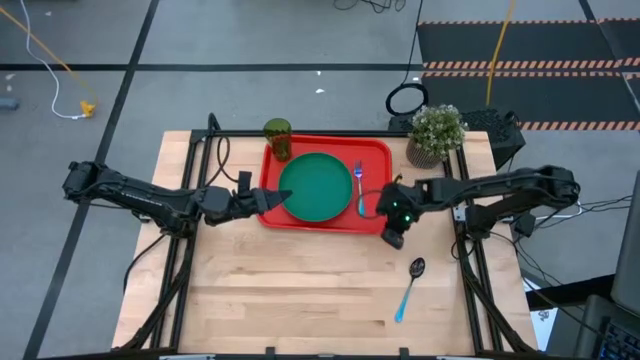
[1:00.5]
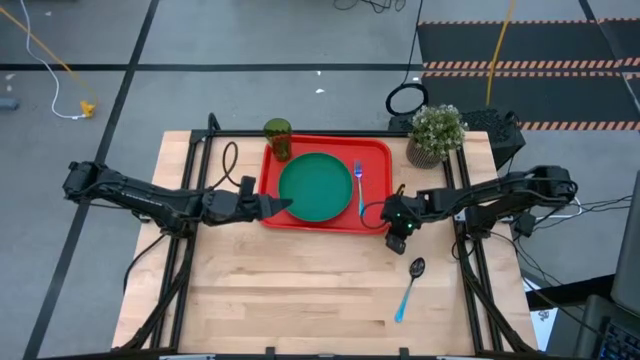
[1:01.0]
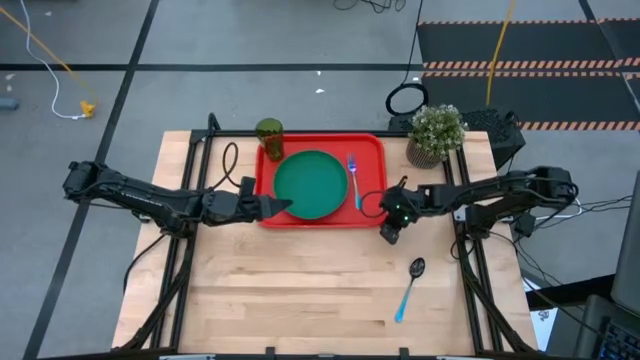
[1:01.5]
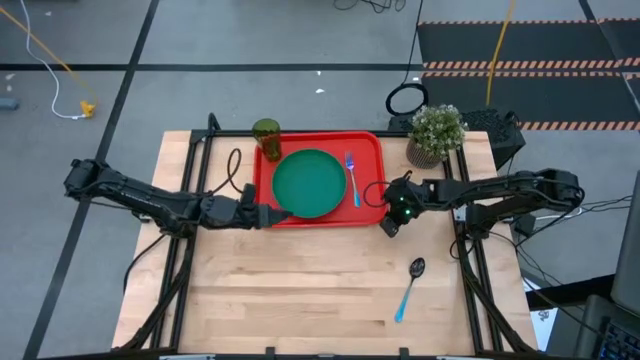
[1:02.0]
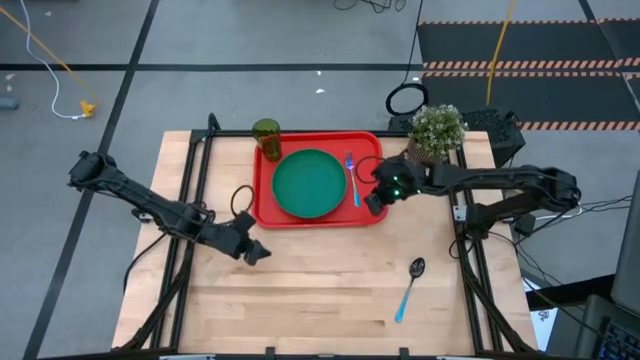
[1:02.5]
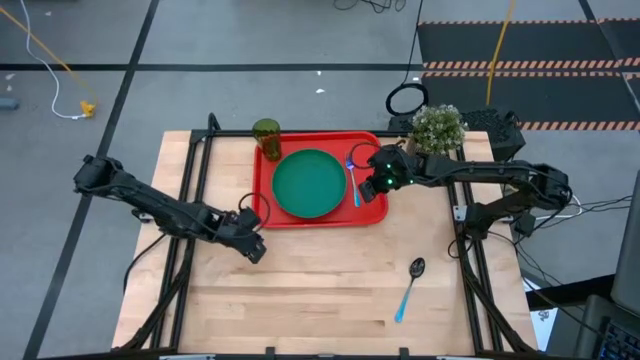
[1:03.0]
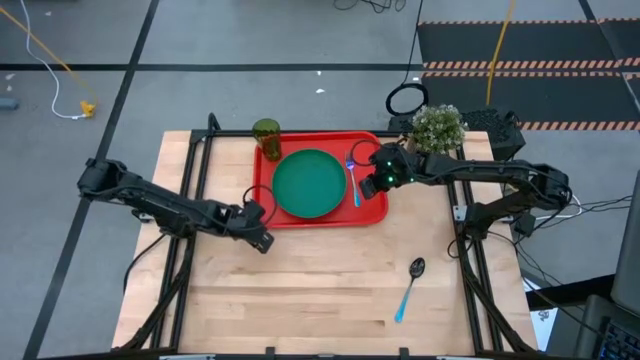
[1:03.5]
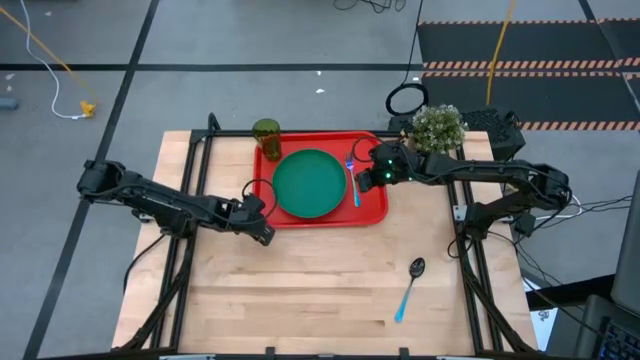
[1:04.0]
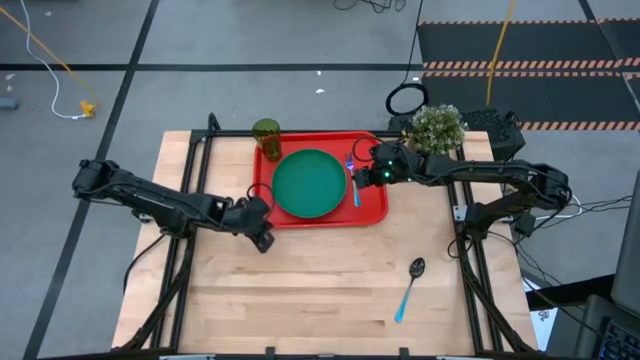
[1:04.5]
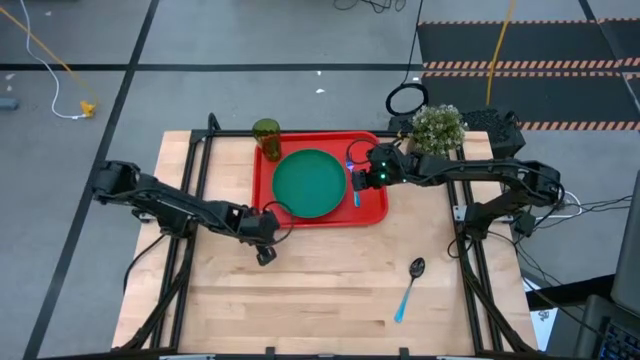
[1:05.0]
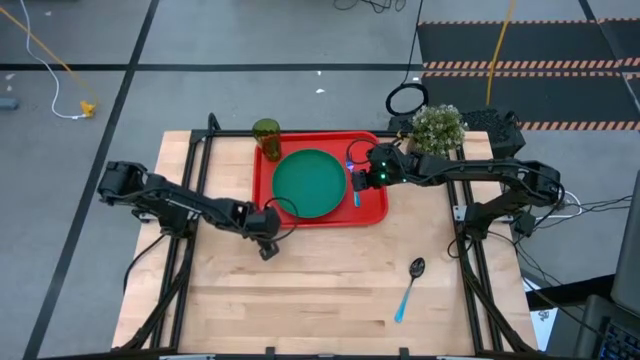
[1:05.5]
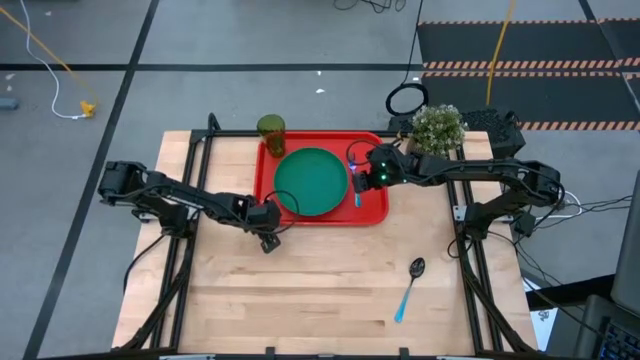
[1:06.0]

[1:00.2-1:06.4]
Task: Pick and place plate/cup/fork/spoon on tray
Adjust the orange serving tray

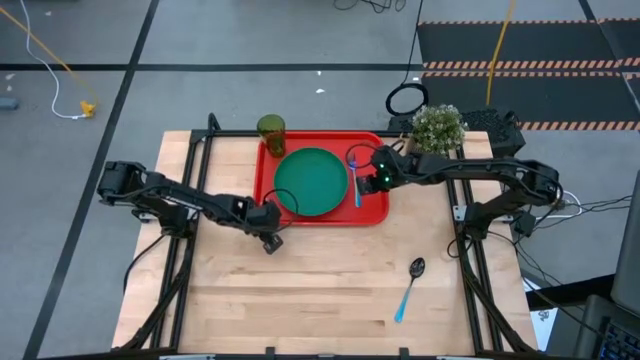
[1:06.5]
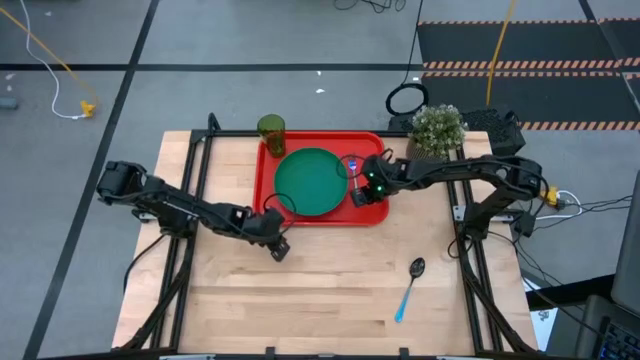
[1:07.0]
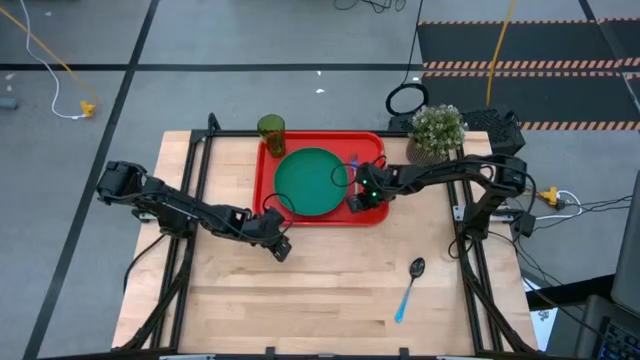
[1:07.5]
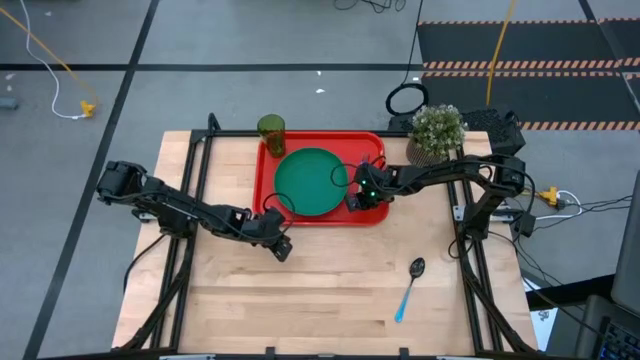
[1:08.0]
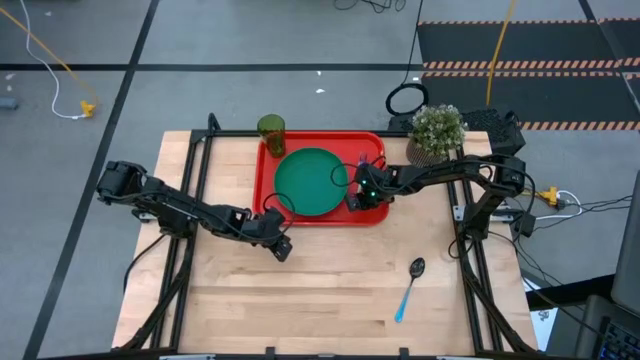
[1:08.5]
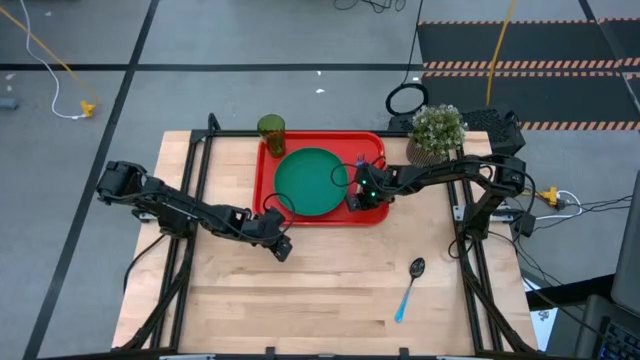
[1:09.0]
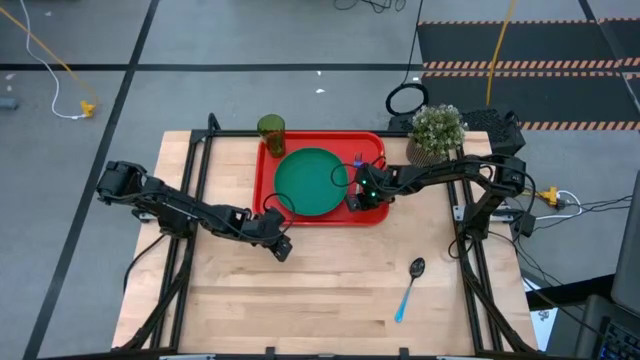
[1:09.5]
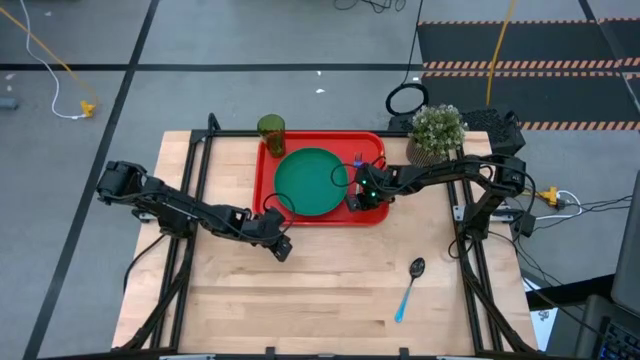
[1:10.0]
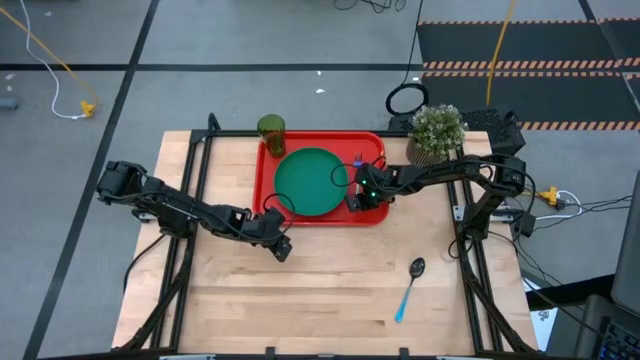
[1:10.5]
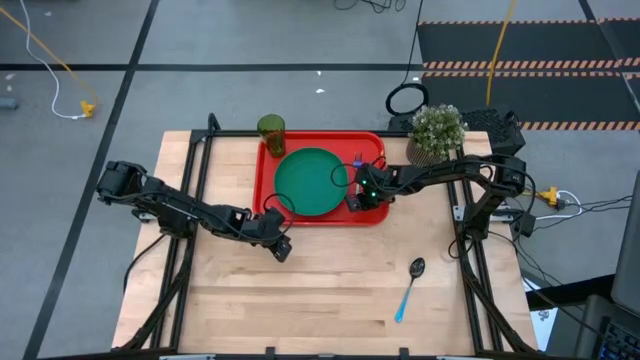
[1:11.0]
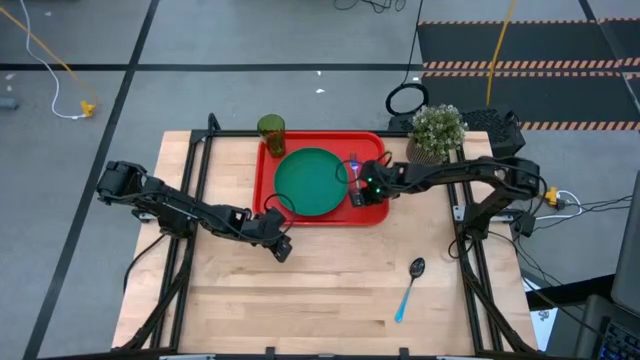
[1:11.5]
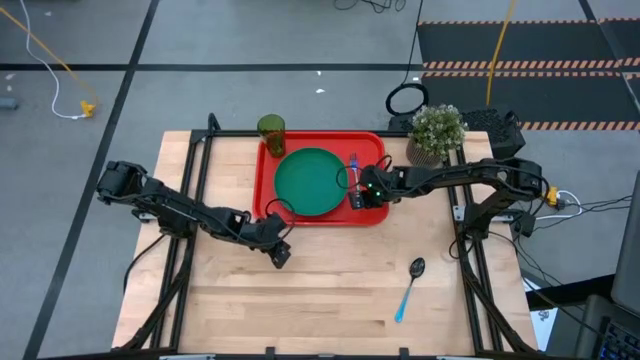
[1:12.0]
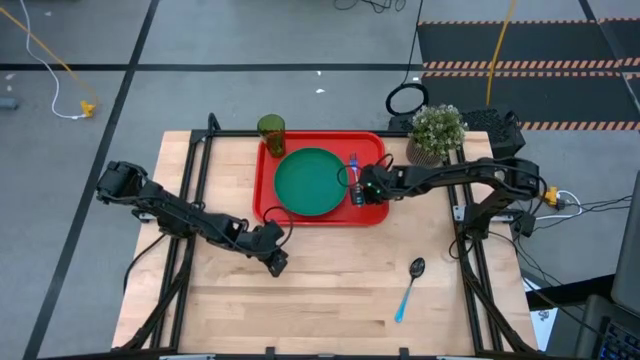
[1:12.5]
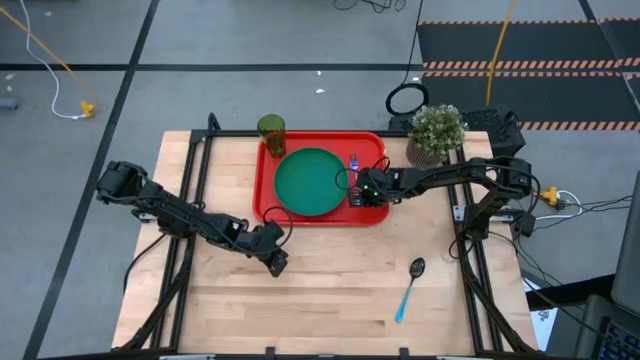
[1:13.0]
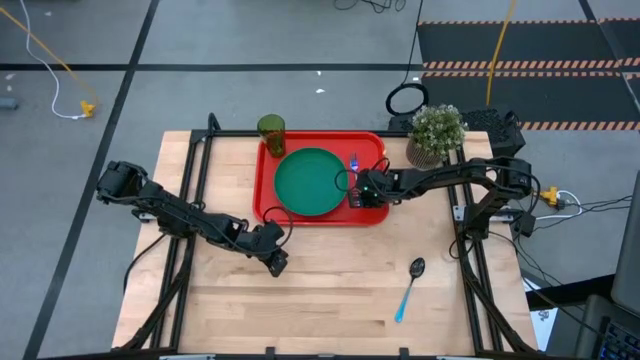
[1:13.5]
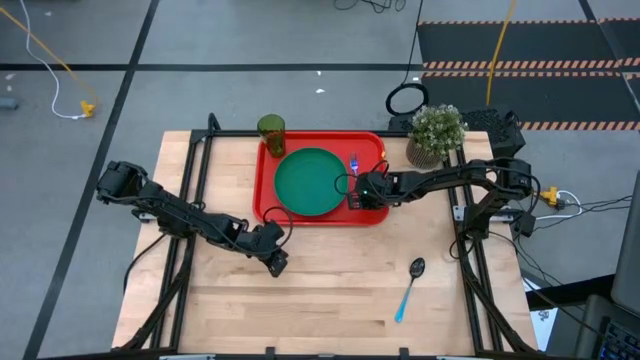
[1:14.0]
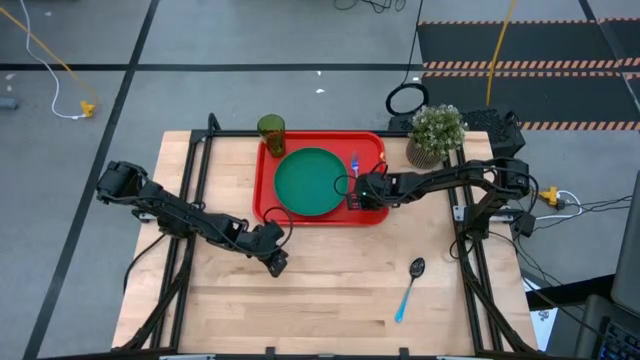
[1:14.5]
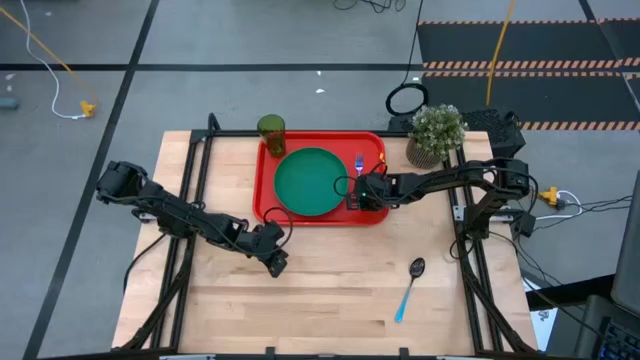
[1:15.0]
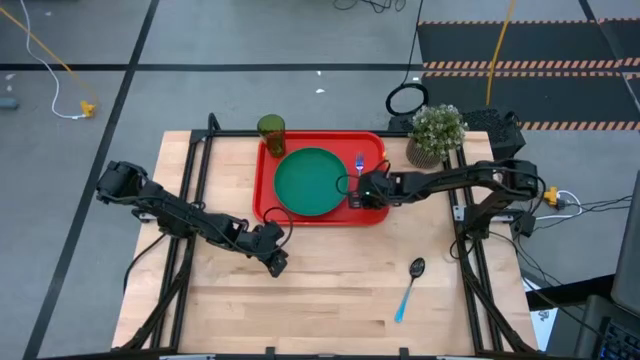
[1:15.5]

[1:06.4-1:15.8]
Adjust the blue fork on the orange serving tray

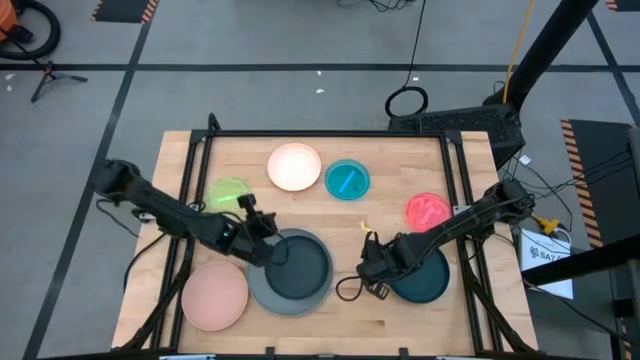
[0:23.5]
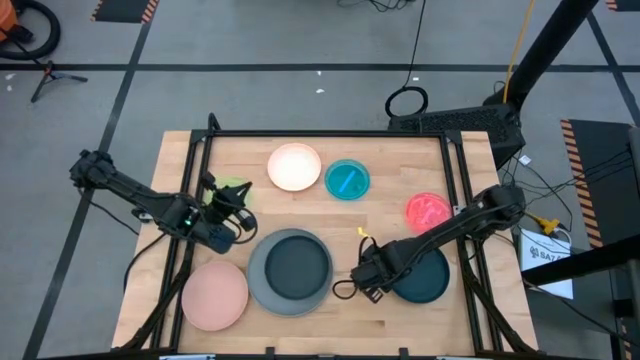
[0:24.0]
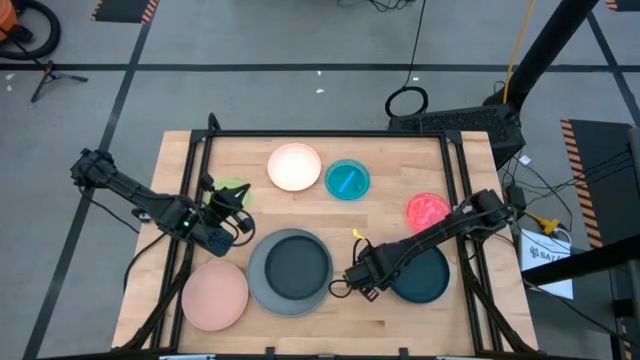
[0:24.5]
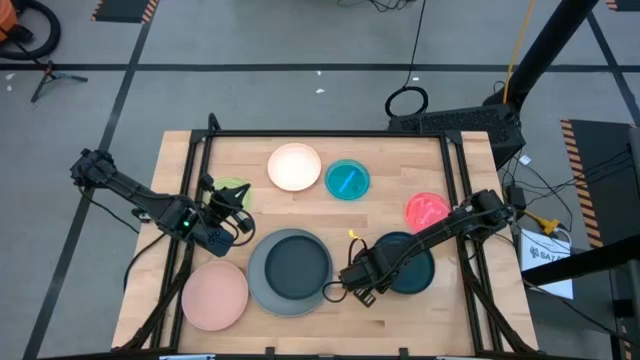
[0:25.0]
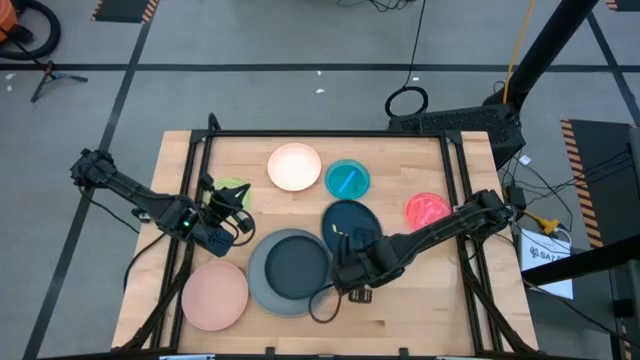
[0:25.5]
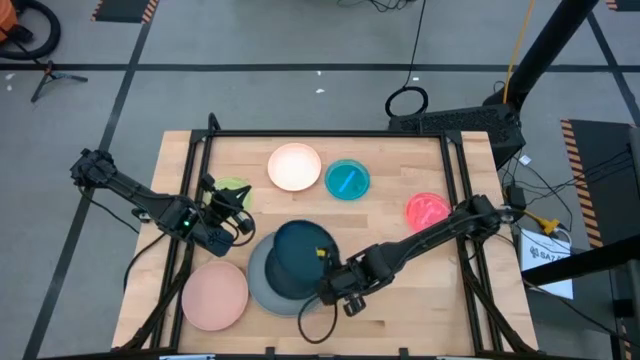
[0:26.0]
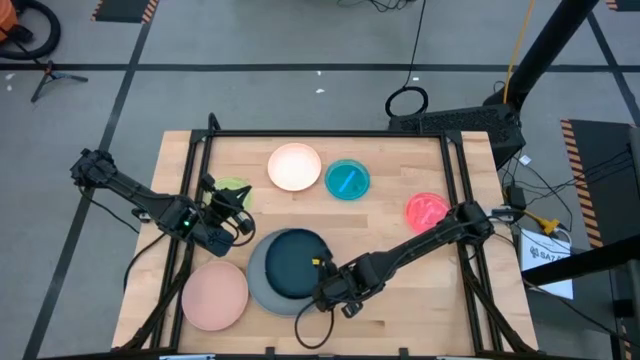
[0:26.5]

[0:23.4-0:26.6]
Task: Stack plastic plates
Stack the black plate on top of the black plate
